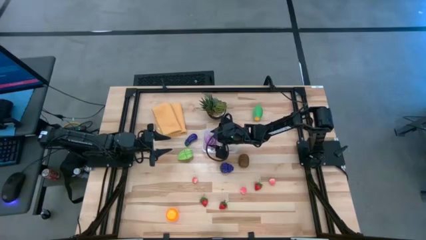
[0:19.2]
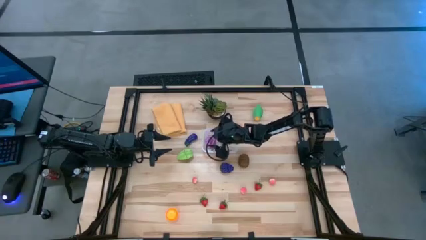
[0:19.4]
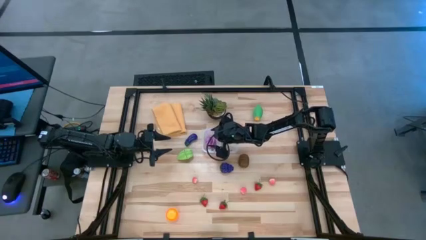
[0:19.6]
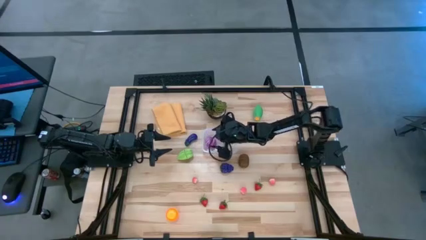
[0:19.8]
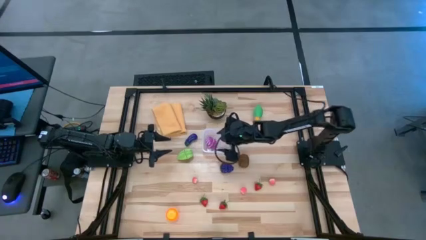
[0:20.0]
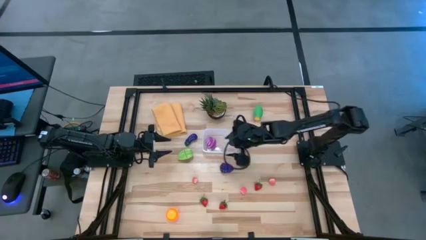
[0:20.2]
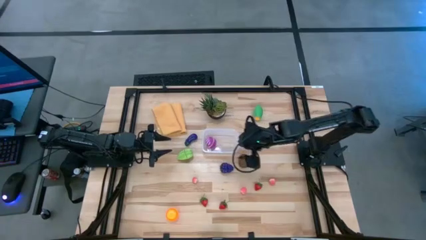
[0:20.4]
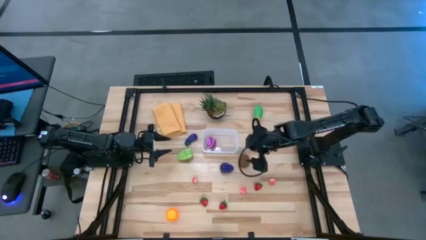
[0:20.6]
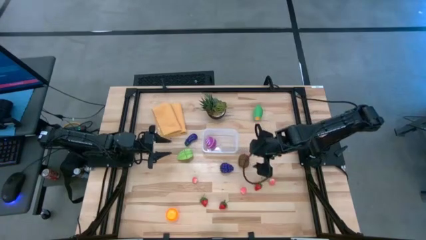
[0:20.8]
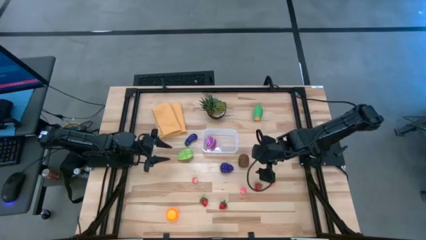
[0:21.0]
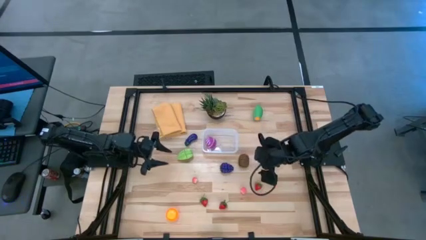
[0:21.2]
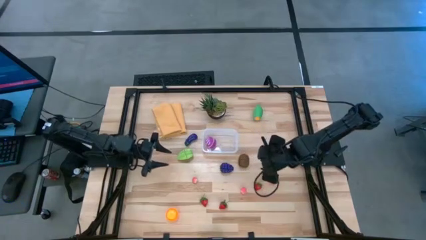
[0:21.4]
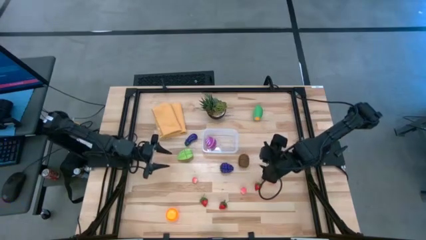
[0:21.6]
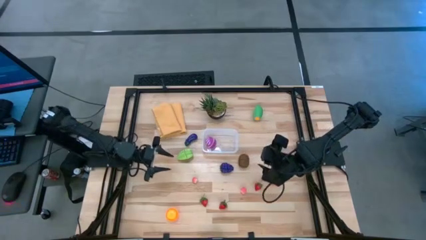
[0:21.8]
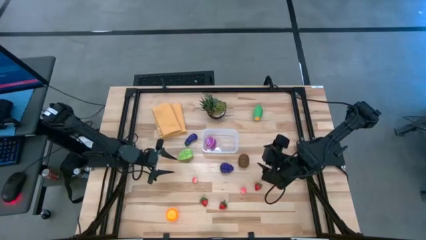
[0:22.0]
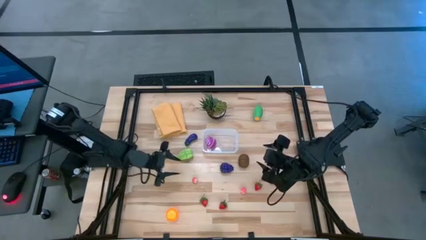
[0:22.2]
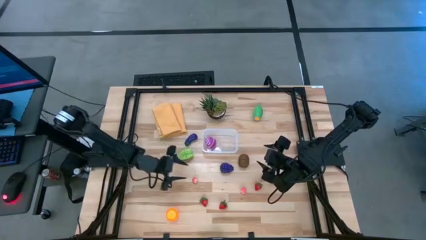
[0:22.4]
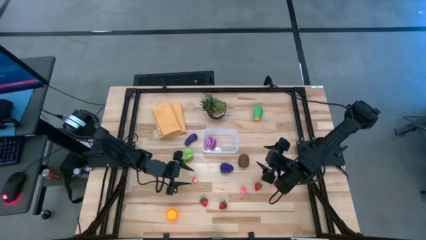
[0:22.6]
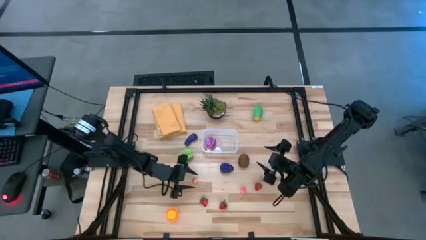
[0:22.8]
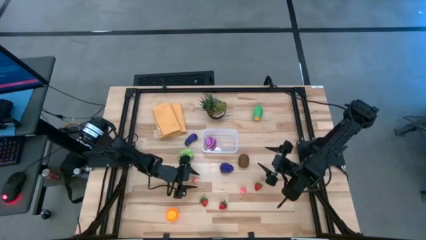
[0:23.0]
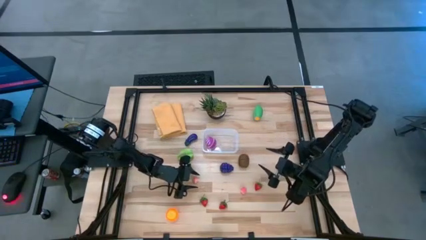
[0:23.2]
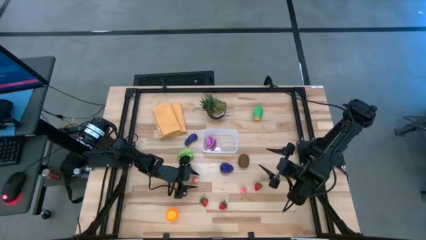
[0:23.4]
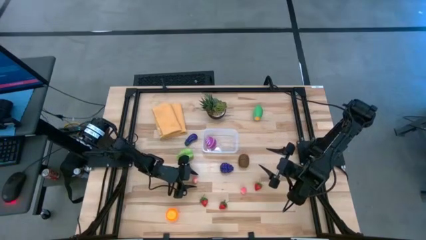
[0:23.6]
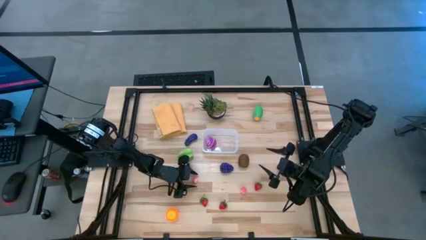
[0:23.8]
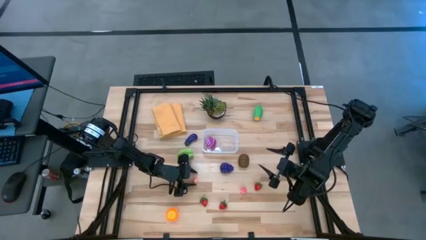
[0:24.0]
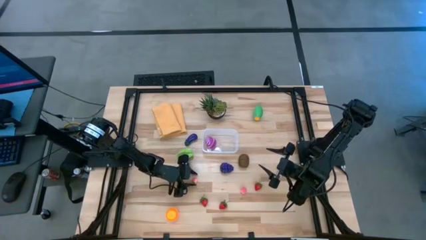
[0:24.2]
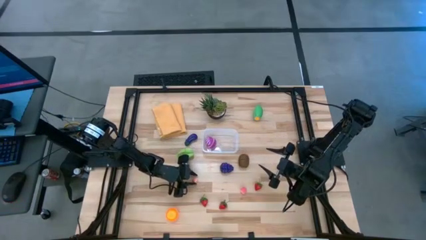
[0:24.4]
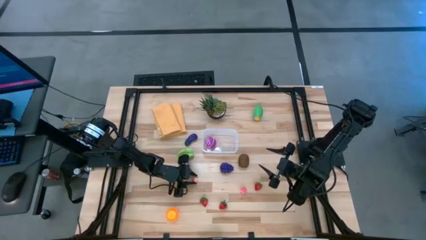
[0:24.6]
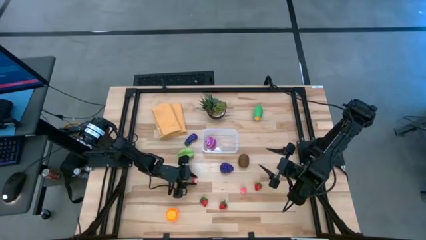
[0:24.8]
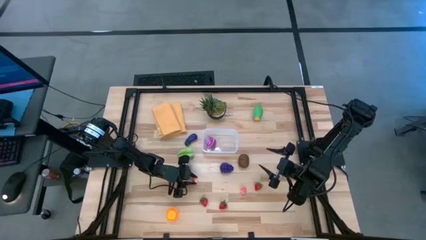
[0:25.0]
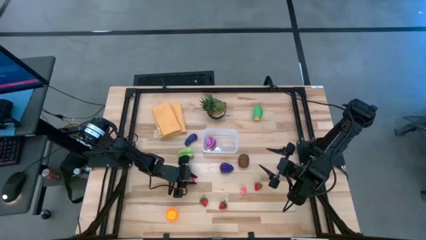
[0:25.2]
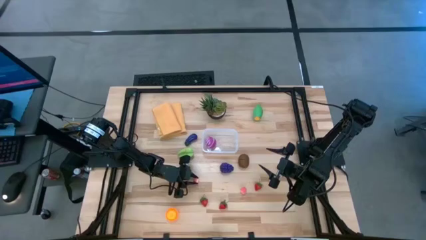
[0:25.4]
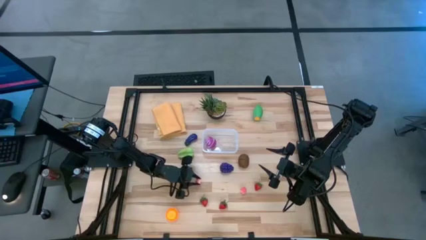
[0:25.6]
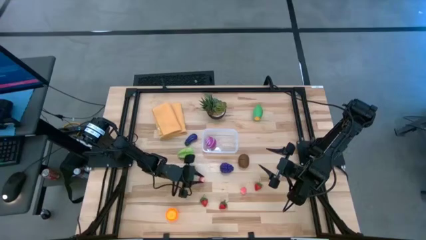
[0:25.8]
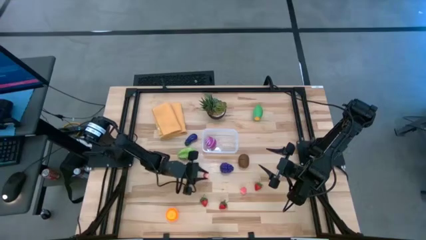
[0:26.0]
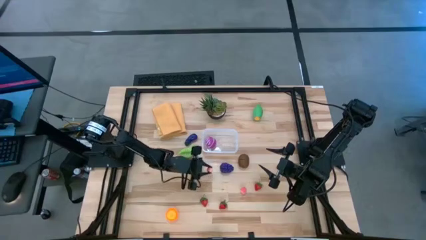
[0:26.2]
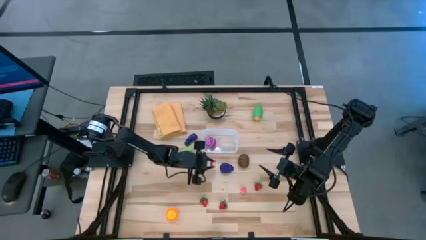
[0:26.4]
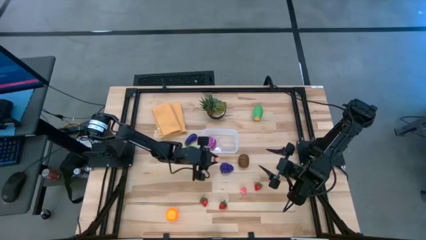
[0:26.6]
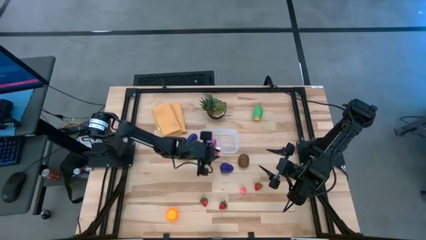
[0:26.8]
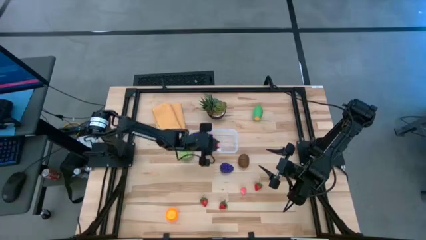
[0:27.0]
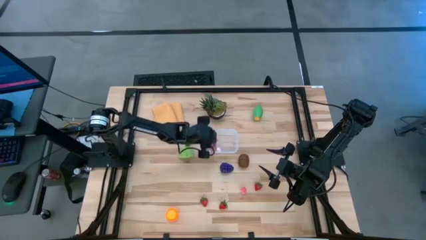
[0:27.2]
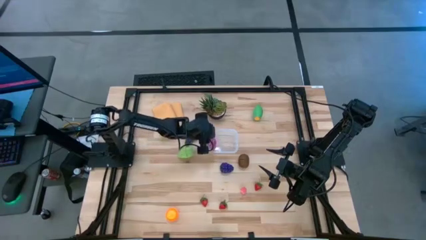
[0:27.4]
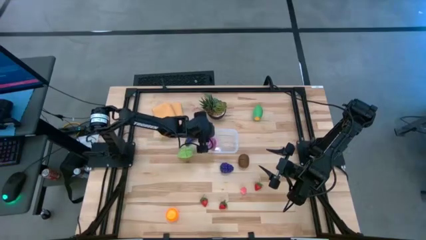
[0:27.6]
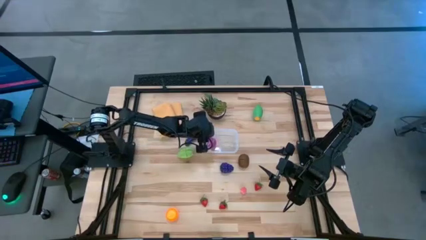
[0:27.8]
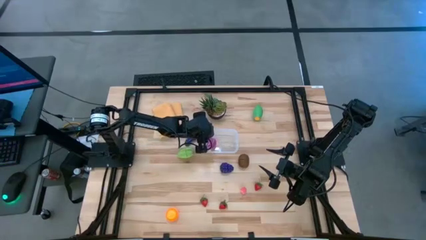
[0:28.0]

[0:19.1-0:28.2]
Task: Pick and placing Produce into tupperware
Put the left pink peach into the transparent container
